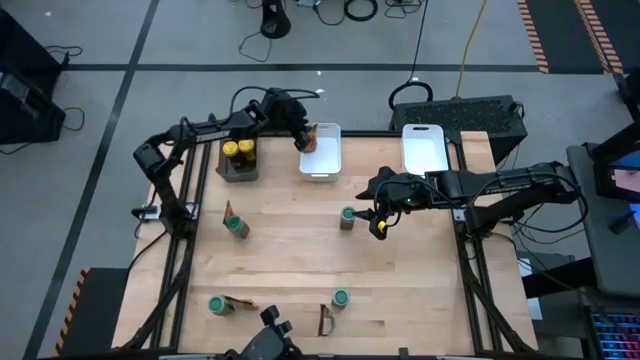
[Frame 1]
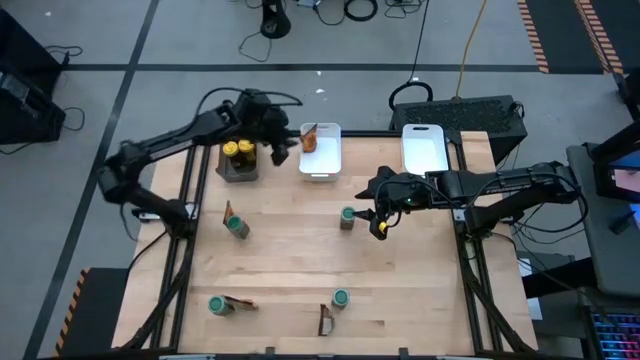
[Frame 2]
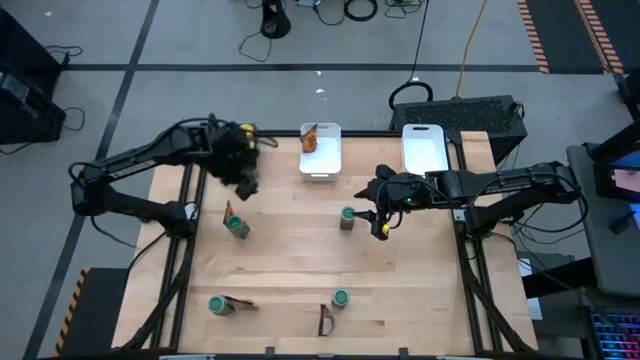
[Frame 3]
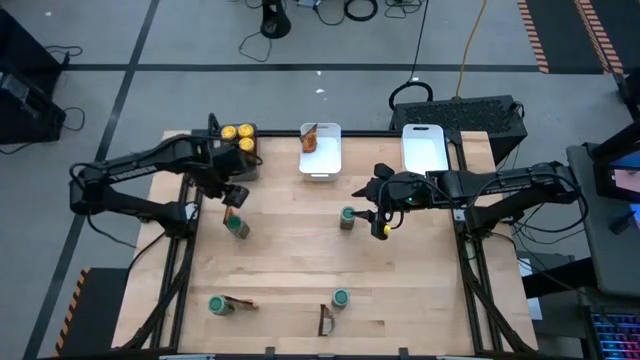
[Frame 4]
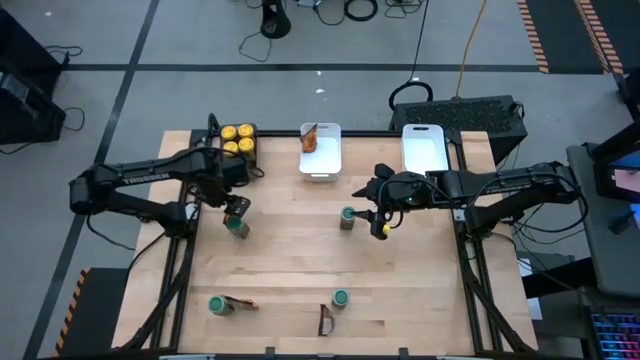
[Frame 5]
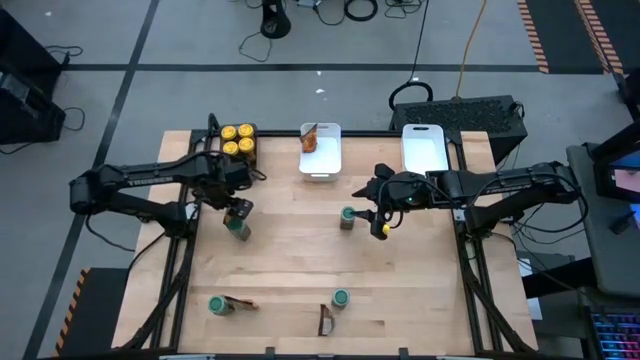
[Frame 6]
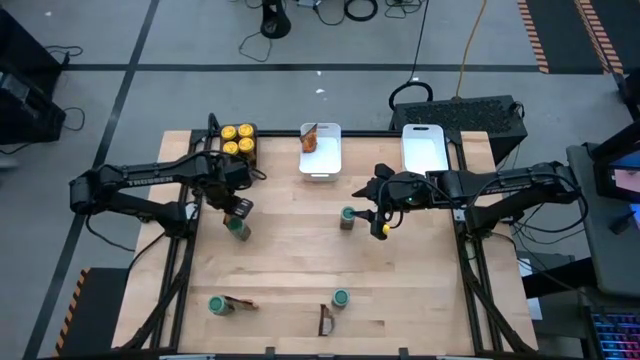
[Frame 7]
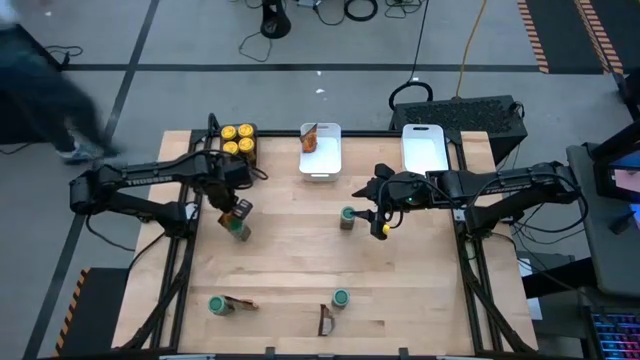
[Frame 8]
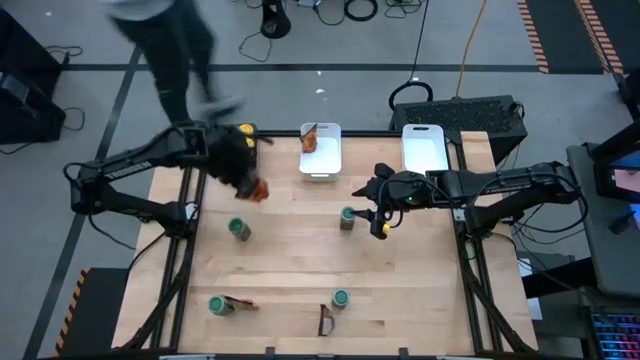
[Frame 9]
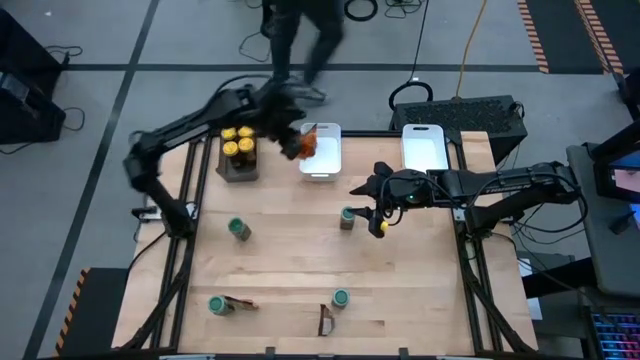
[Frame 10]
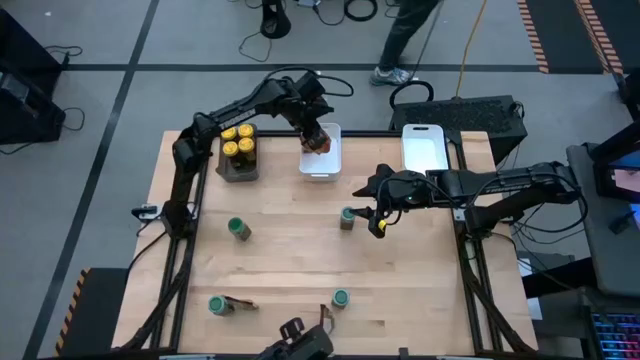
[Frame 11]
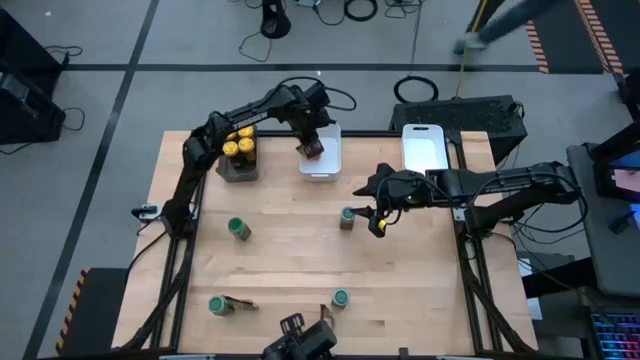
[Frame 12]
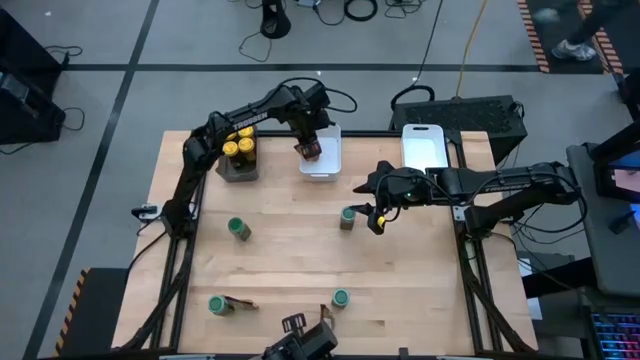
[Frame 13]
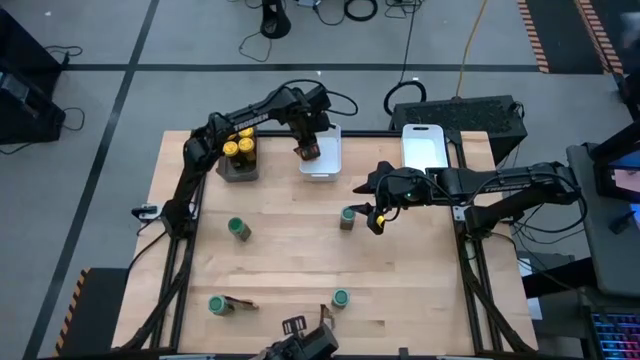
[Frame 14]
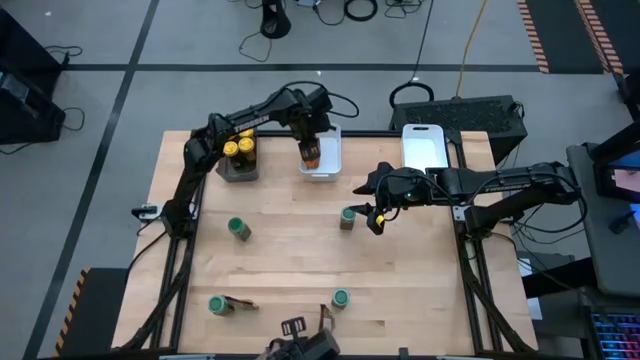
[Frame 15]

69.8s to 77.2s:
Task: Sort spices by type
Put the top orange seasoning pack into the left white bin

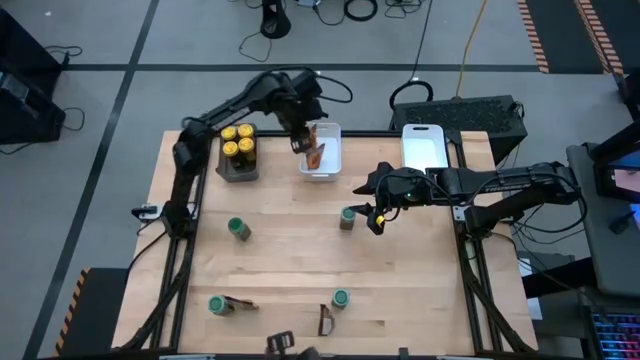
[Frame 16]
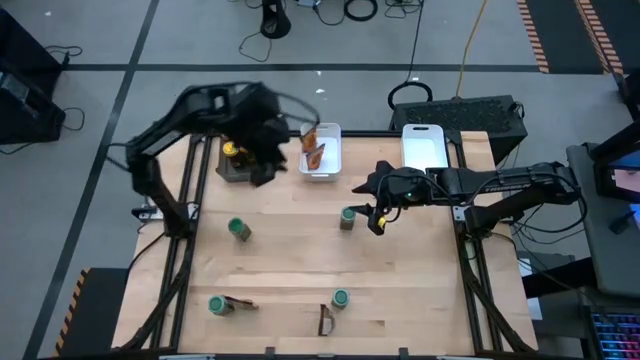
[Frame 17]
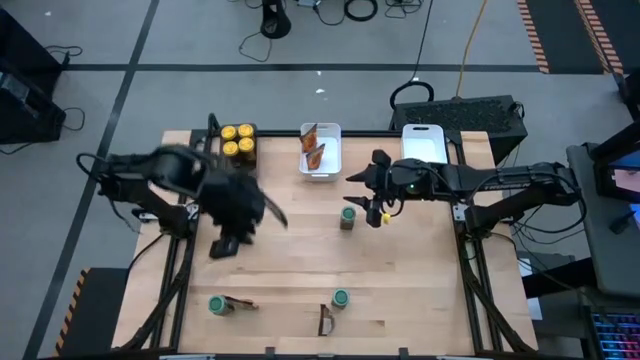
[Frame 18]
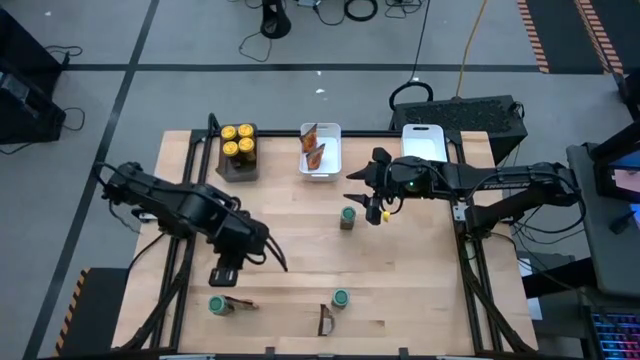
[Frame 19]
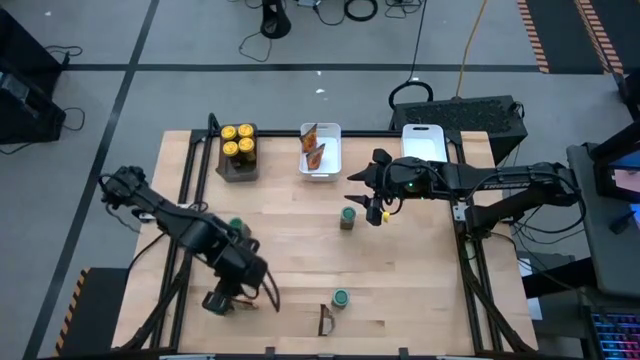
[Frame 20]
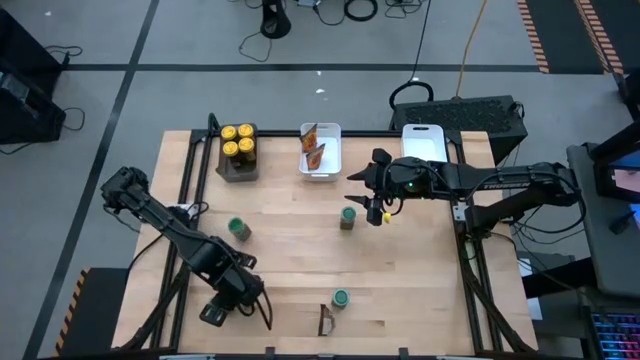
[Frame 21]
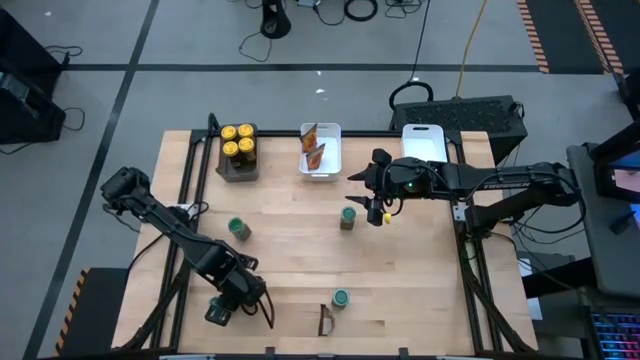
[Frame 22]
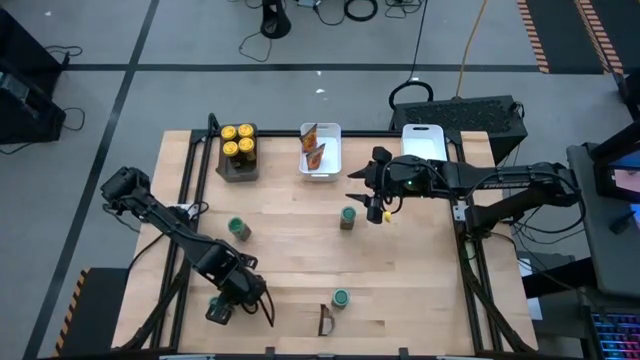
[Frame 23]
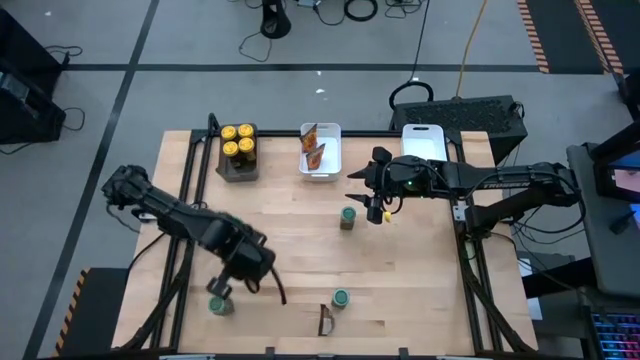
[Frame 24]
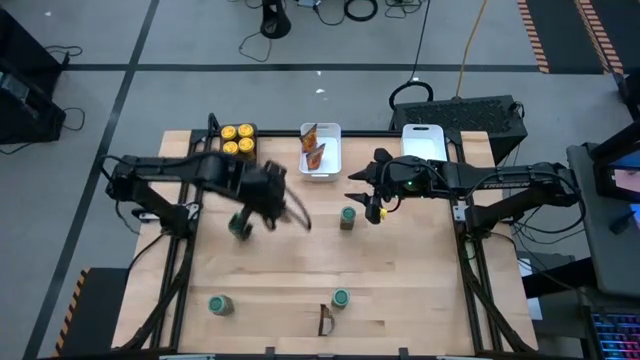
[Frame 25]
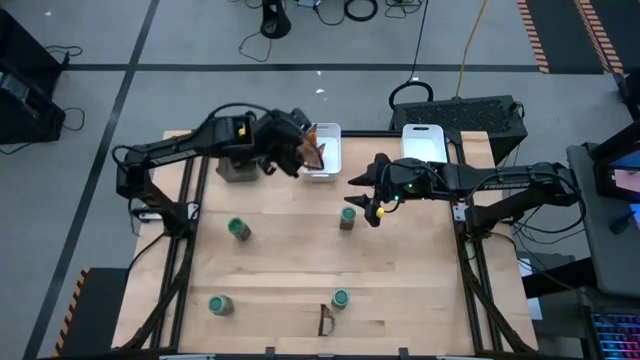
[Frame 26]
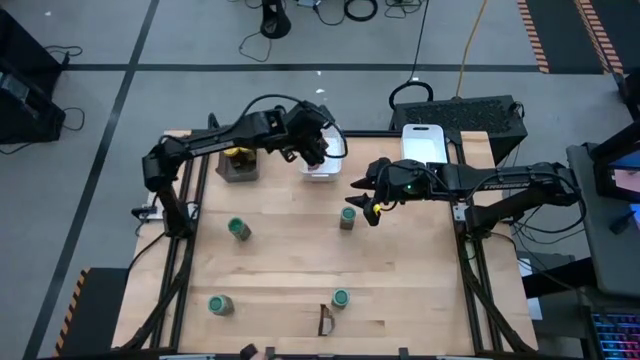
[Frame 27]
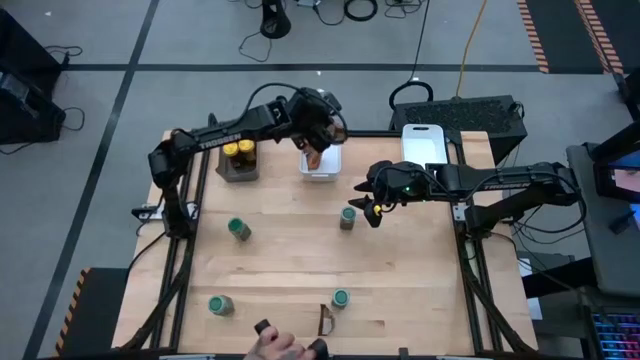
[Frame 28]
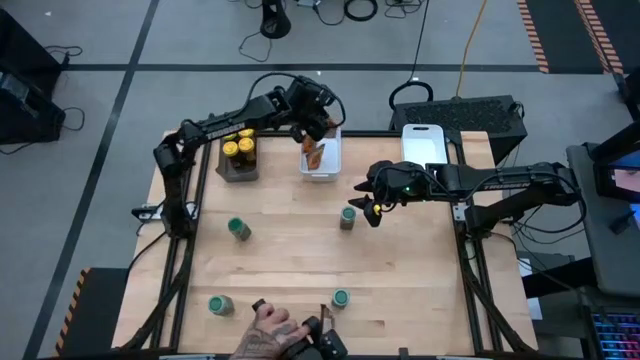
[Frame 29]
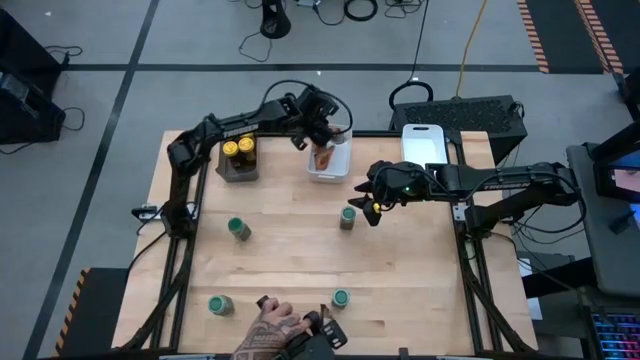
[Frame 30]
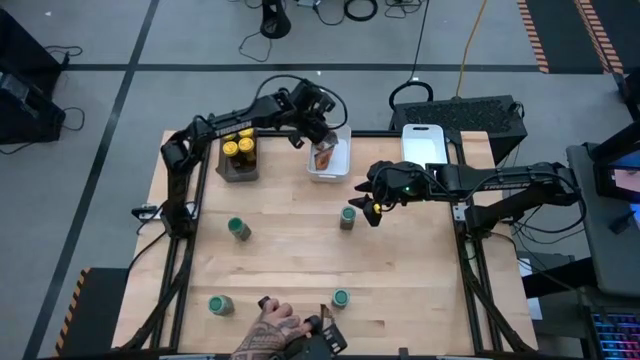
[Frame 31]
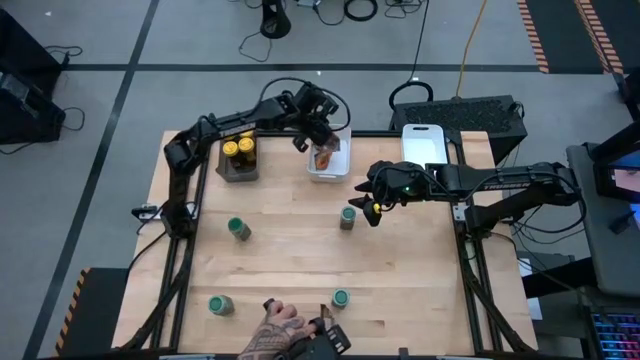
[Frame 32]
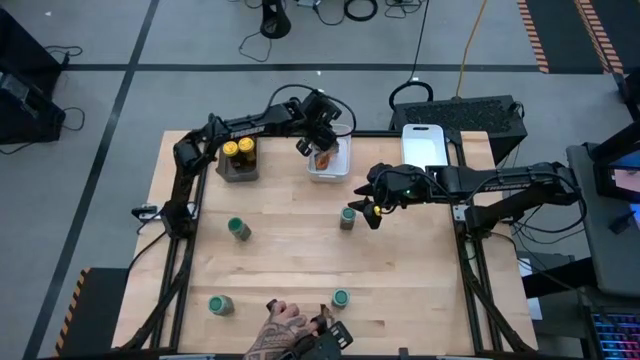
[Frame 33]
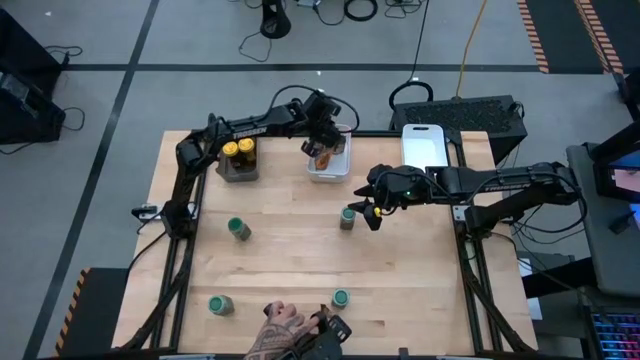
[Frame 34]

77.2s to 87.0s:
Put the left orange seasoning pack into the left white bin

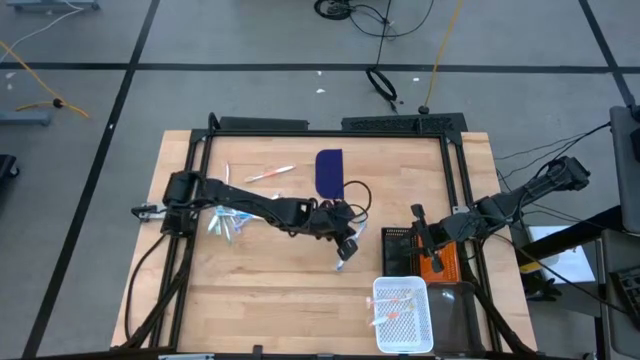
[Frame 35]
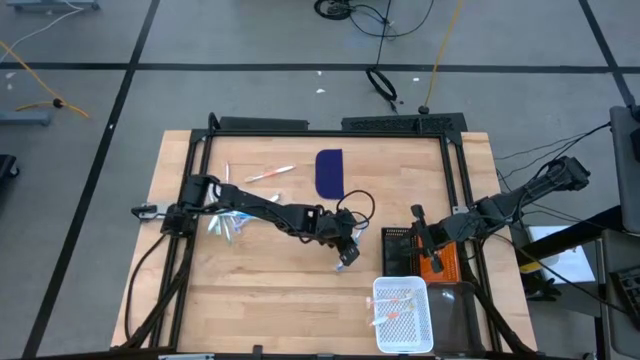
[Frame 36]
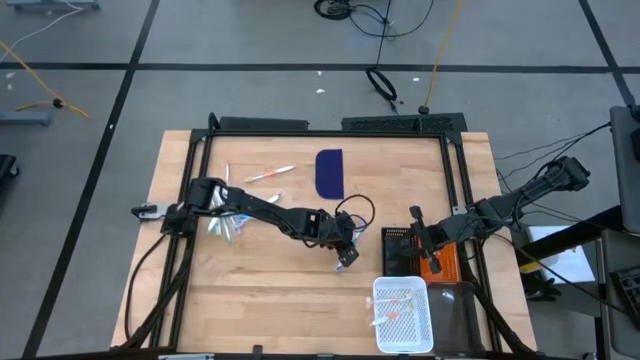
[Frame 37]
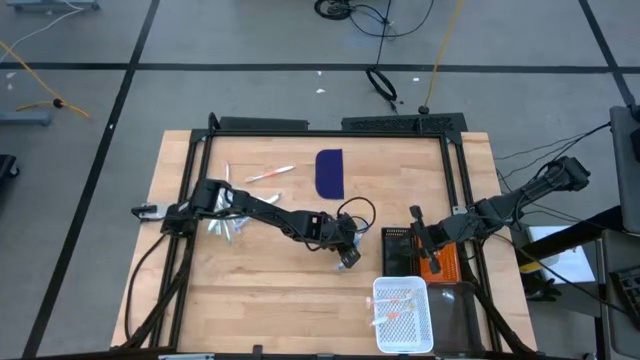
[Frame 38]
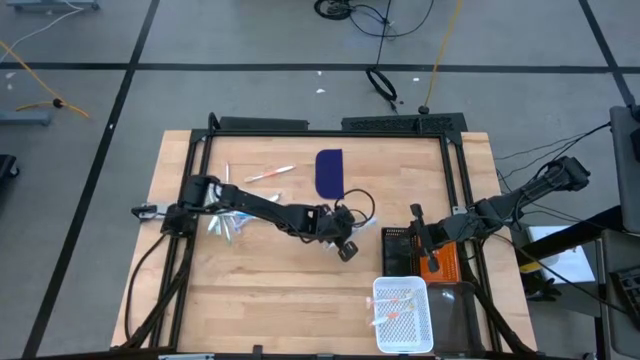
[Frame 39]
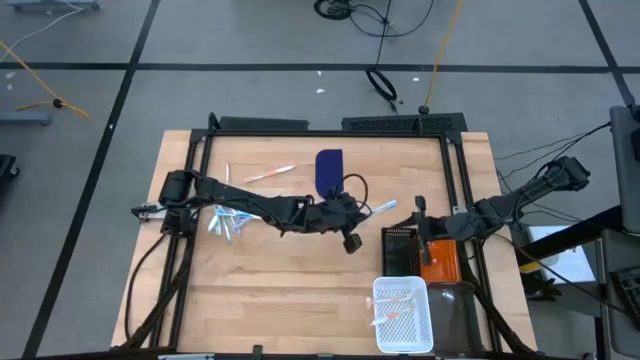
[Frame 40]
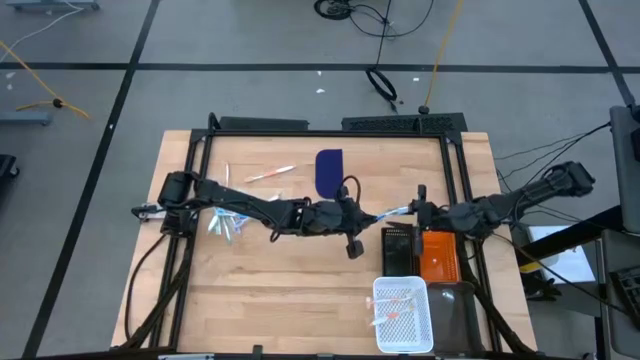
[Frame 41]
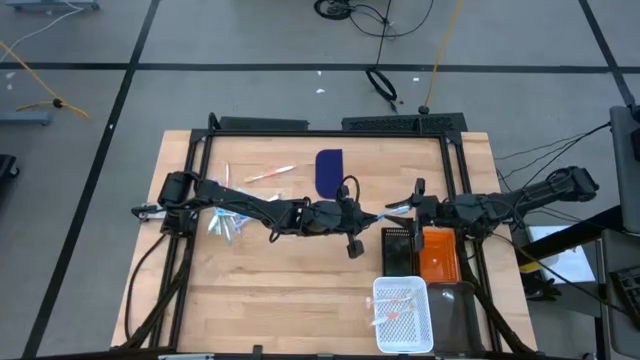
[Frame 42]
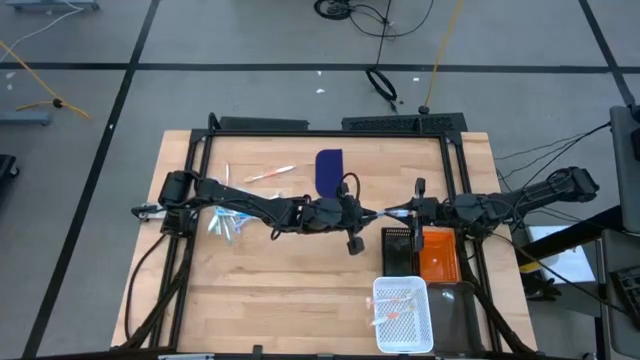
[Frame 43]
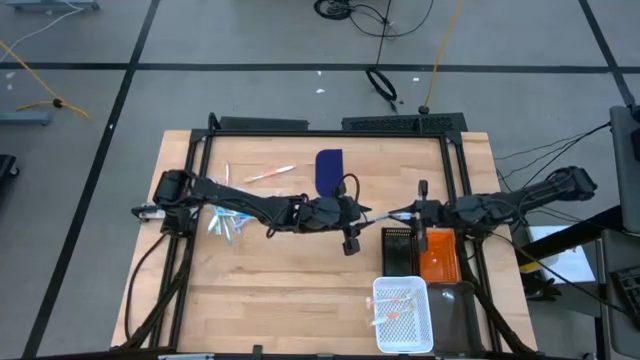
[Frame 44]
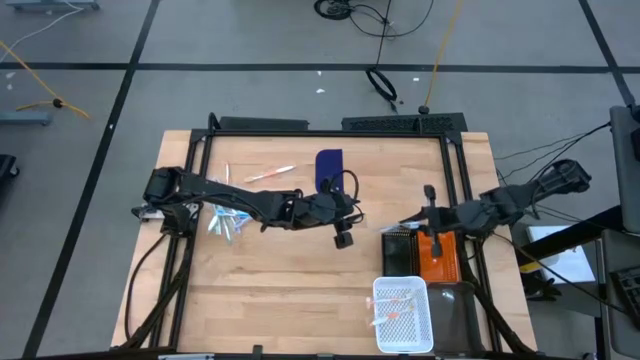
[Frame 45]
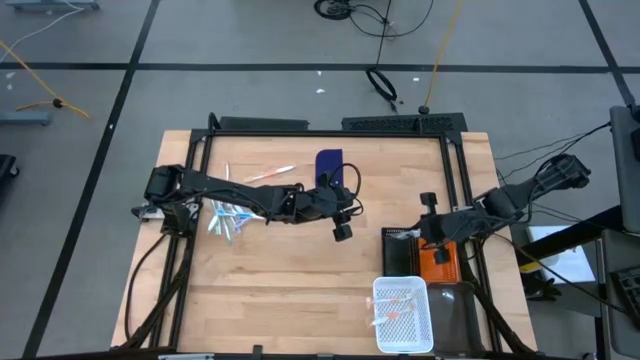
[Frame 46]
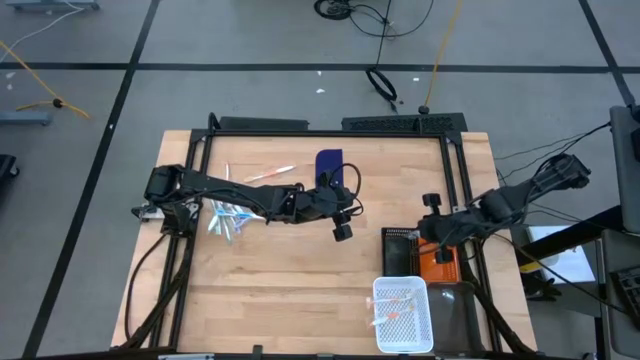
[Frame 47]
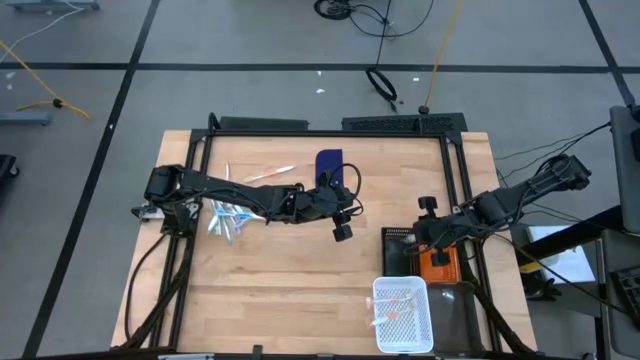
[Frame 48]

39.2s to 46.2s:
Task: Pick & Place Toothbrushes
Put the blue toothbrush into the black basket
